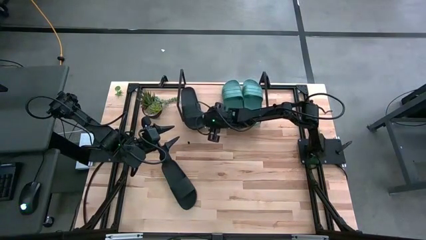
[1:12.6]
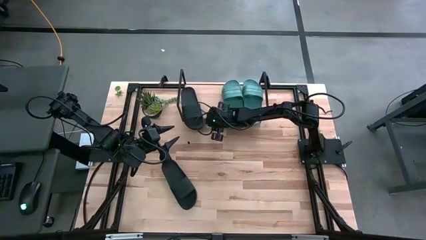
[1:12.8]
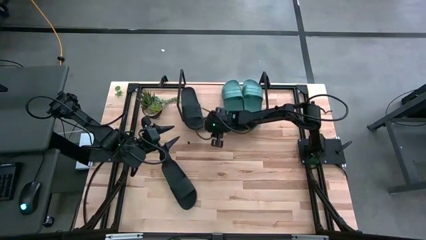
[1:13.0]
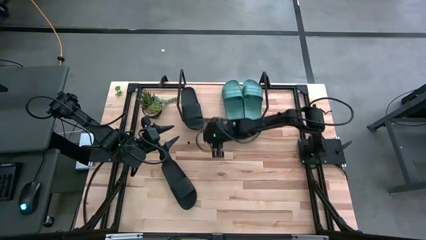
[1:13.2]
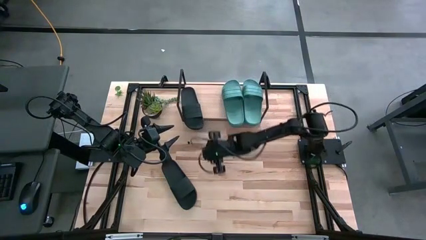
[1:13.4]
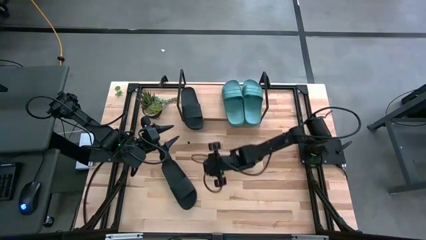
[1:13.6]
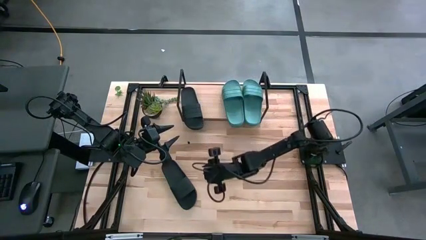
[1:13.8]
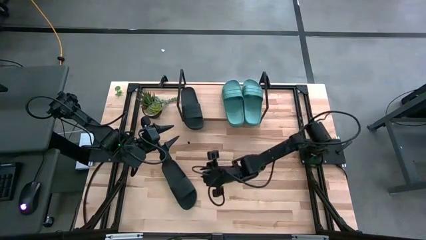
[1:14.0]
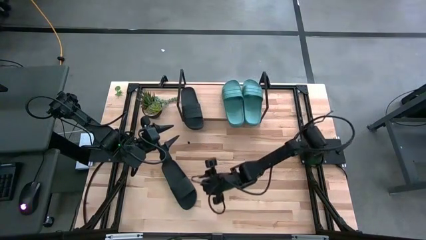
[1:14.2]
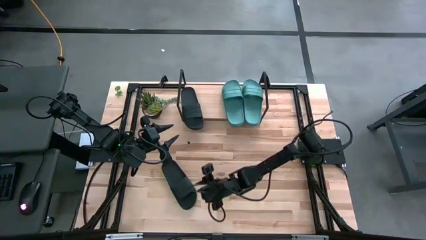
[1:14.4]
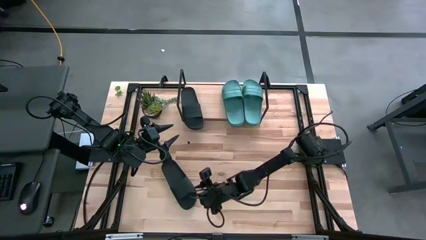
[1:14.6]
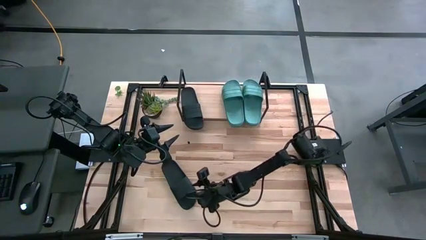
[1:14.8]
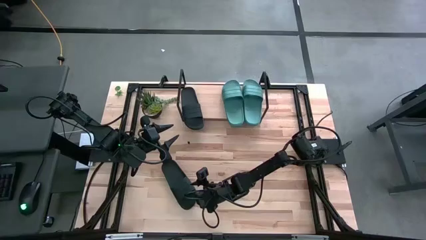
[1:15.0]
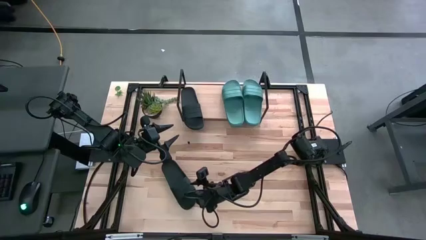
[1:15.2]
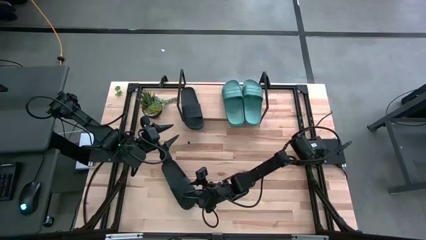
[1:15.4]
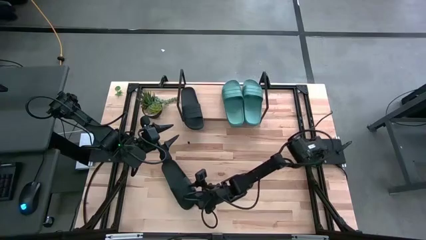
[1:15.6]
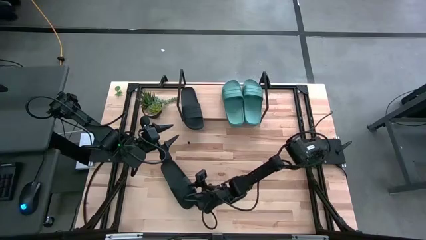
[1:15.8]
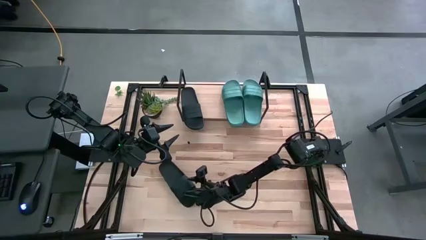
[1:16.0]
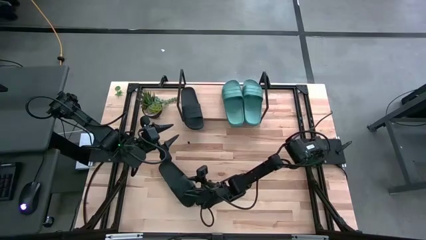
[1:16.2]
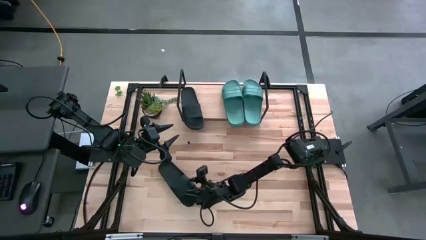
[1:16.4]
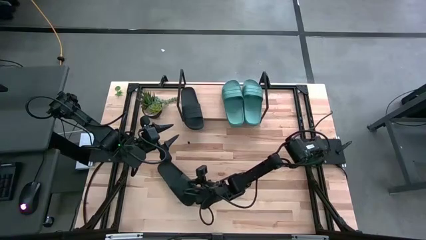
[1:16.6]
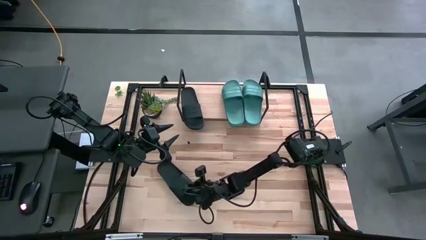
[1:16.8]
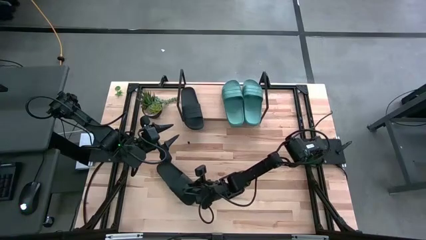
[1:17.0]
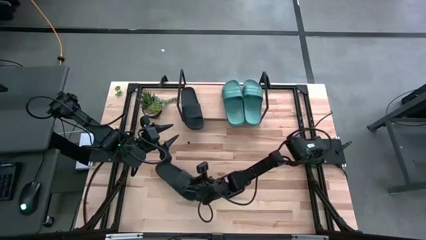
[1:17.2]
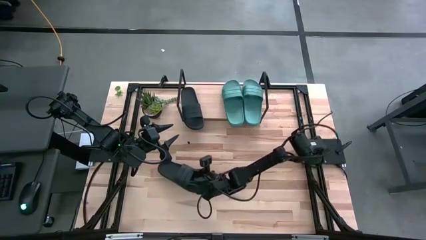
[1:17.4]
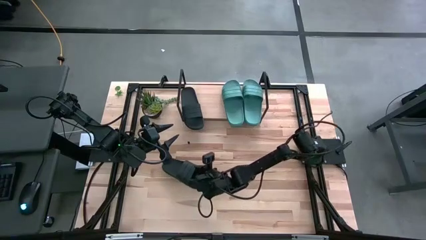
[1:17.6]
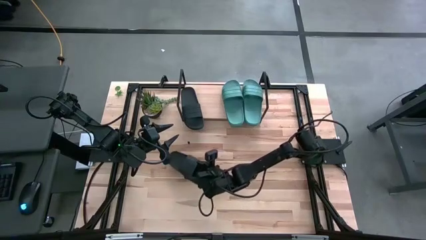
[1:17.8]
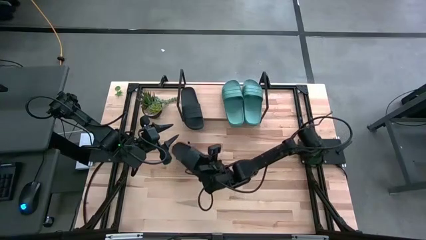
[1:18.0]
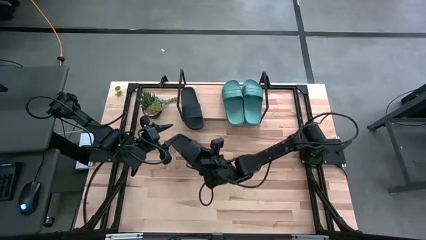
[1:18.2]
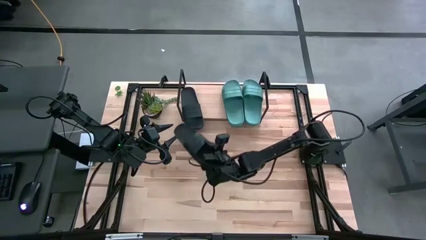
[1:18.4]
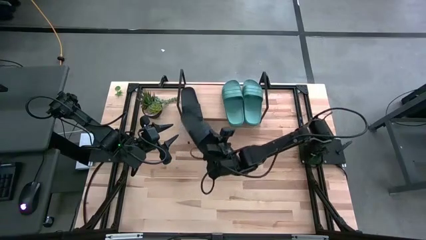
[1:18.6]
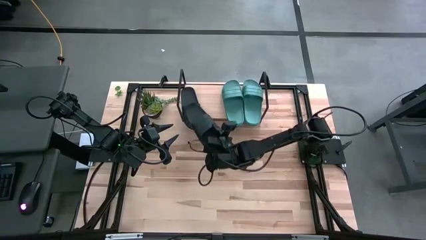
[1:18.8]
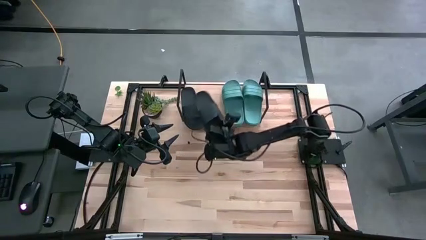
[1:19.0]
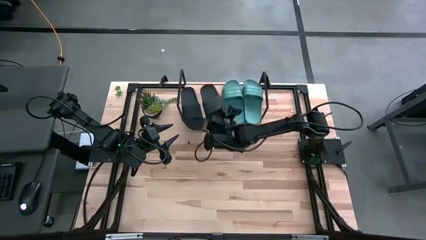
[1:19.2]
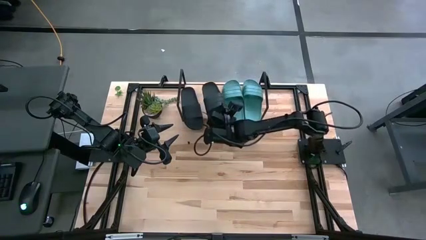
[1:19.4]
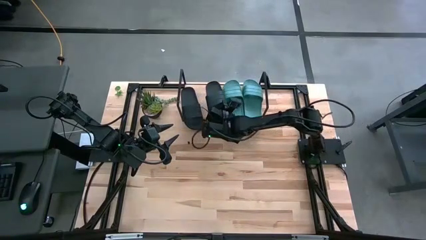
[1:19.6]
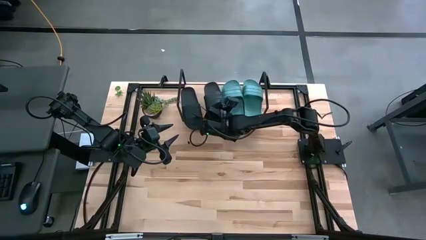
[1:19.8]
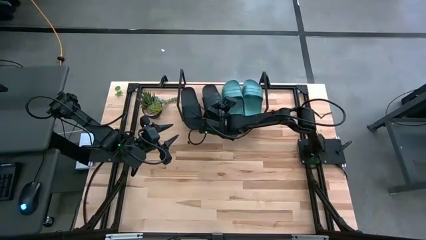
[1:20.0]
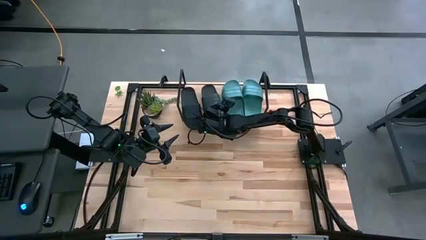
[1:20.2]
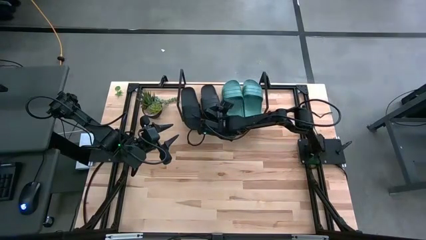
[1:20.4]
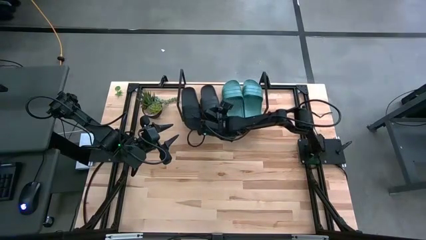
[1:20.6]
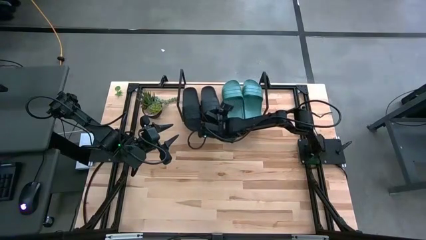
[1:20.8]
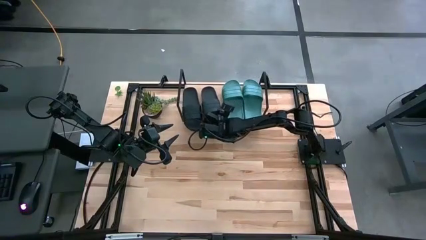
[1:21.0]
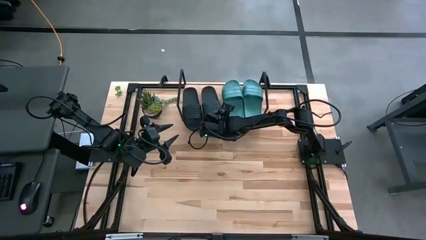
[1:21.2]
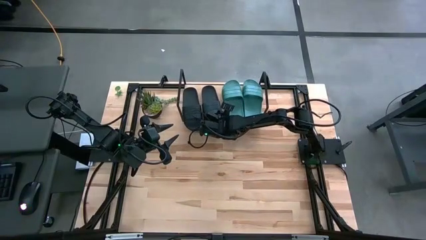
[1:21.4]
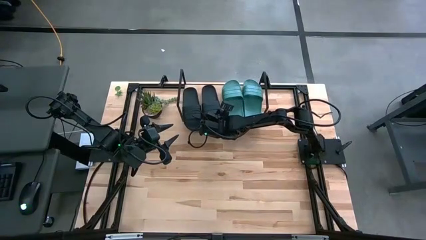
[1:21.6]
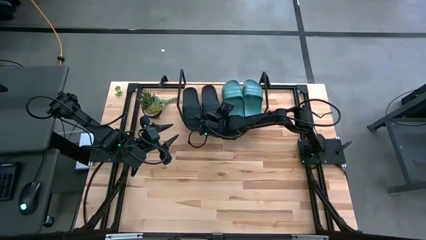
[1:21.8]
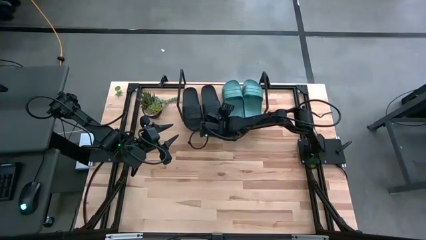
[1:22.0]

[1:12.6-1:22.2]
Task: Pick and place slides into the shelf
Put the black slide on the shelf

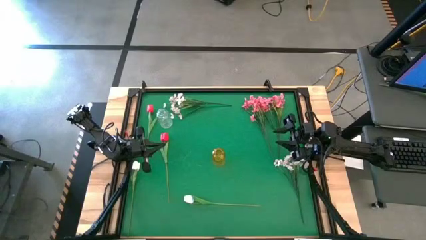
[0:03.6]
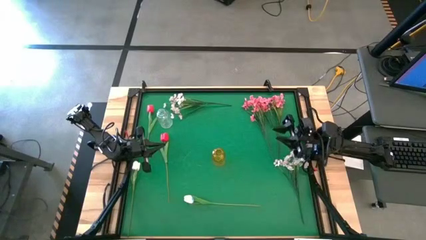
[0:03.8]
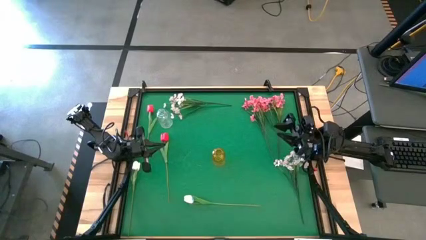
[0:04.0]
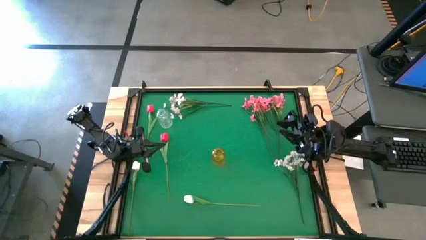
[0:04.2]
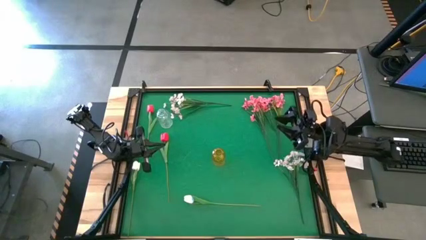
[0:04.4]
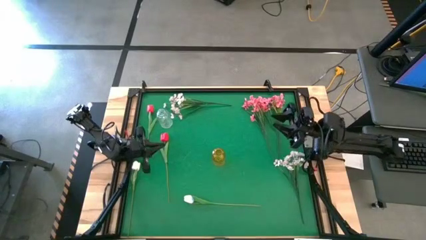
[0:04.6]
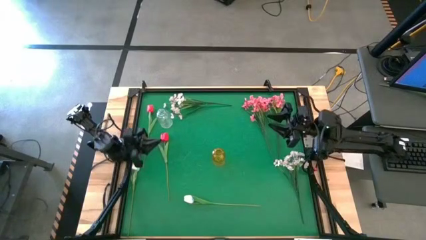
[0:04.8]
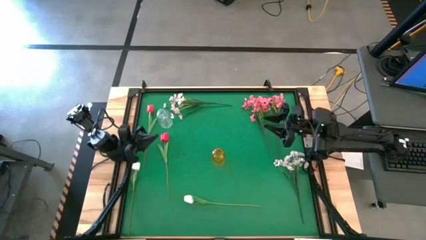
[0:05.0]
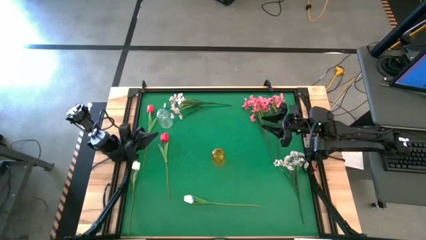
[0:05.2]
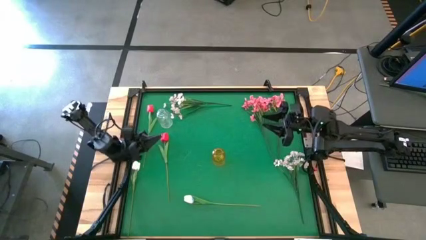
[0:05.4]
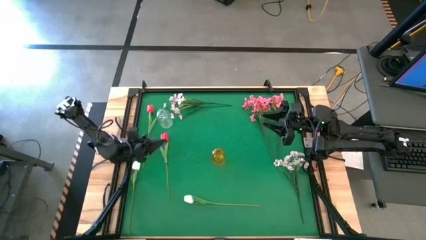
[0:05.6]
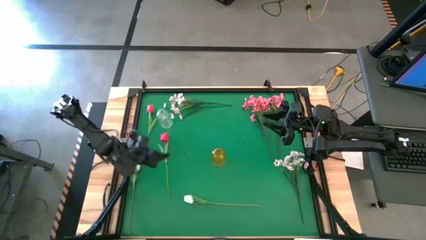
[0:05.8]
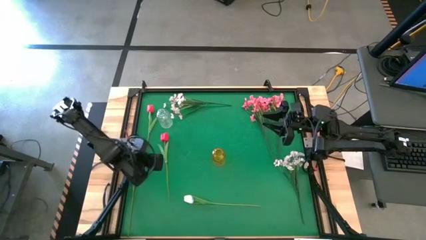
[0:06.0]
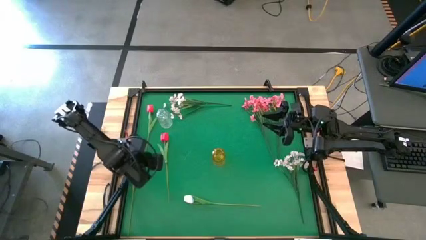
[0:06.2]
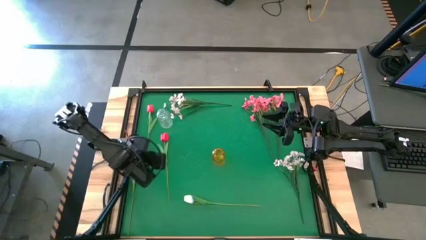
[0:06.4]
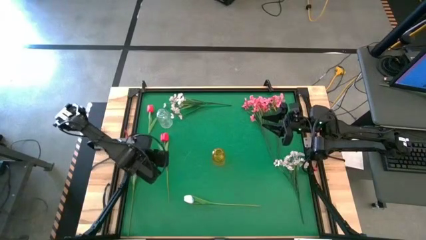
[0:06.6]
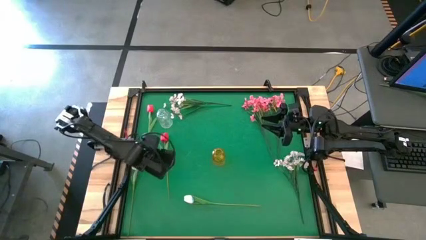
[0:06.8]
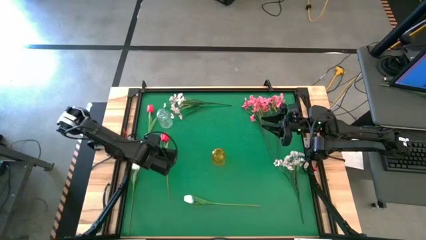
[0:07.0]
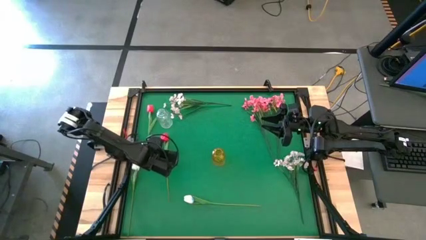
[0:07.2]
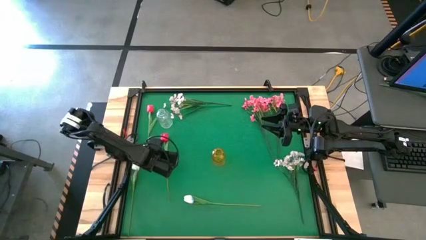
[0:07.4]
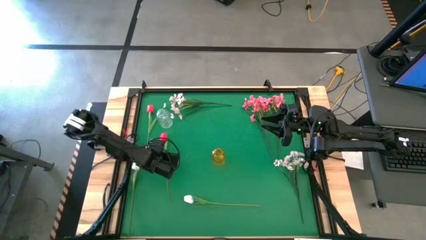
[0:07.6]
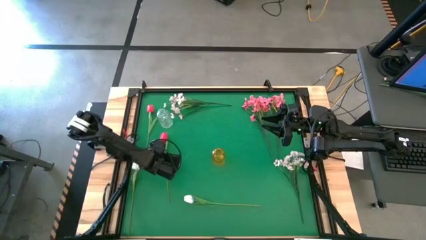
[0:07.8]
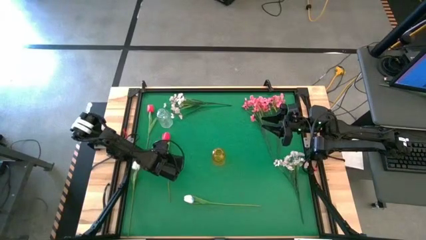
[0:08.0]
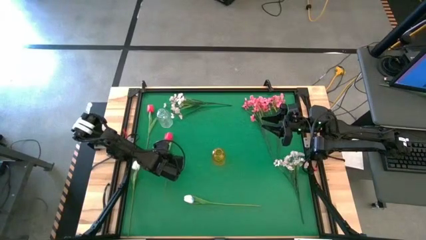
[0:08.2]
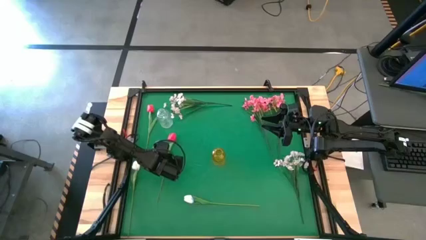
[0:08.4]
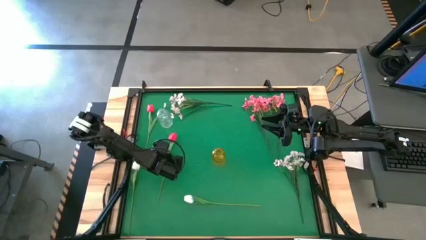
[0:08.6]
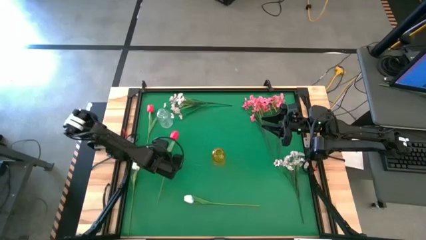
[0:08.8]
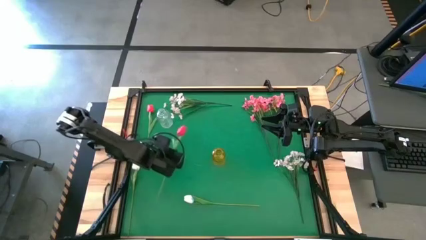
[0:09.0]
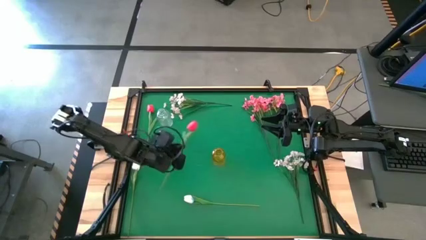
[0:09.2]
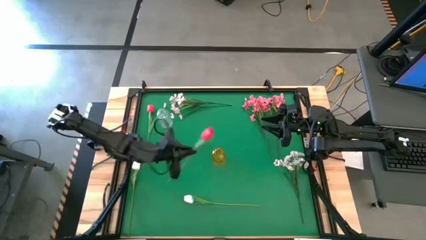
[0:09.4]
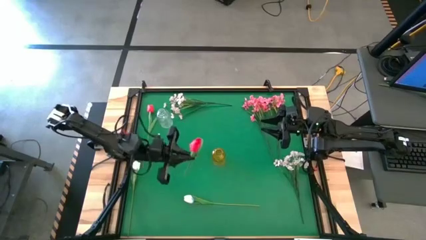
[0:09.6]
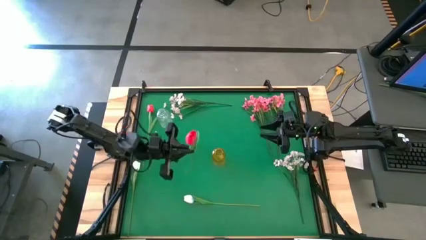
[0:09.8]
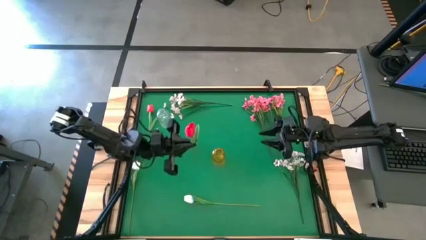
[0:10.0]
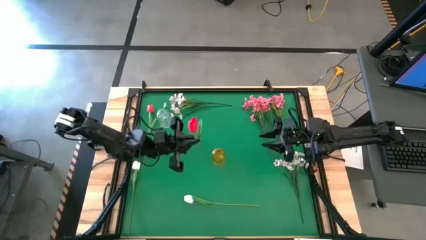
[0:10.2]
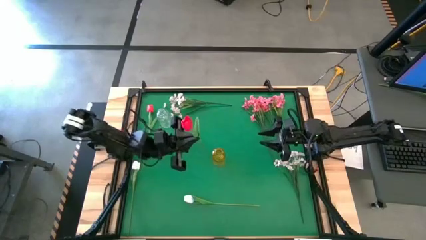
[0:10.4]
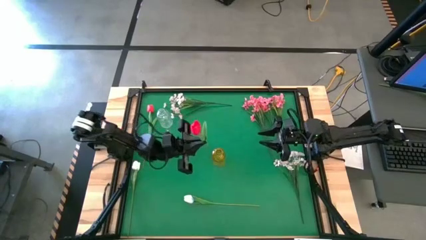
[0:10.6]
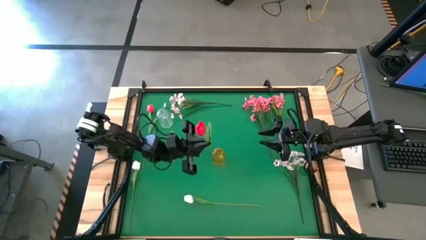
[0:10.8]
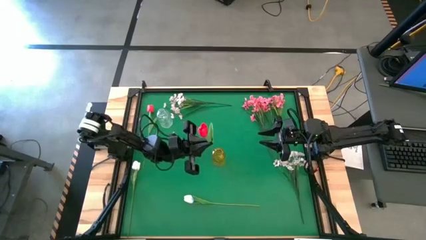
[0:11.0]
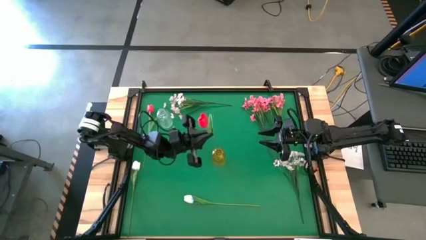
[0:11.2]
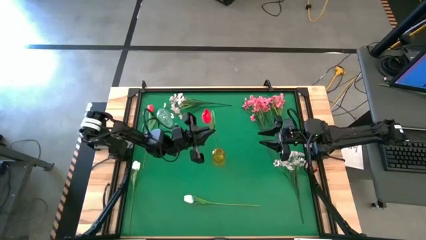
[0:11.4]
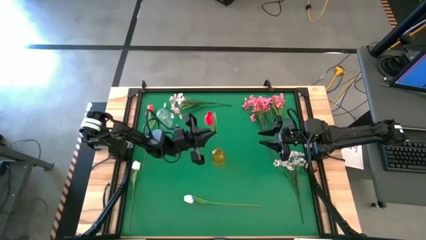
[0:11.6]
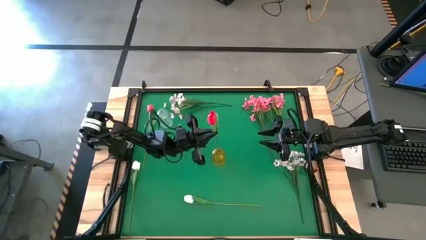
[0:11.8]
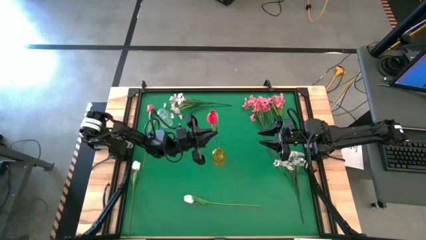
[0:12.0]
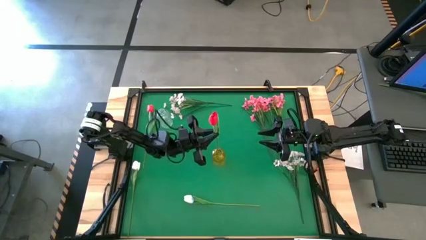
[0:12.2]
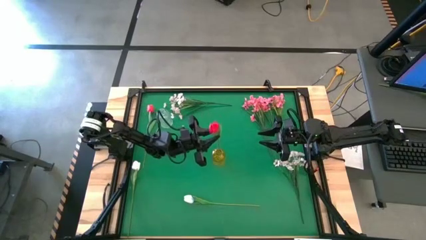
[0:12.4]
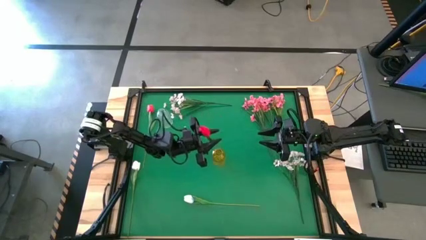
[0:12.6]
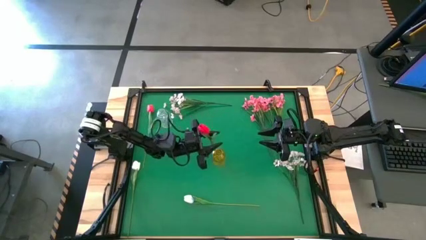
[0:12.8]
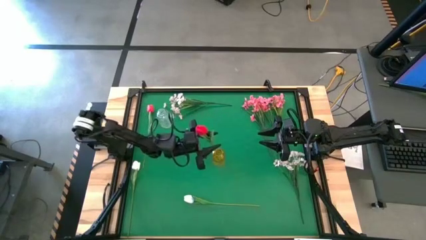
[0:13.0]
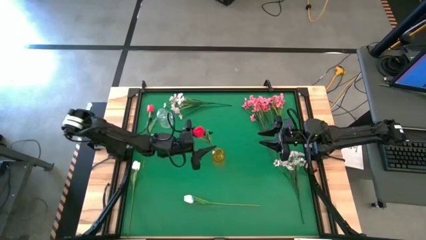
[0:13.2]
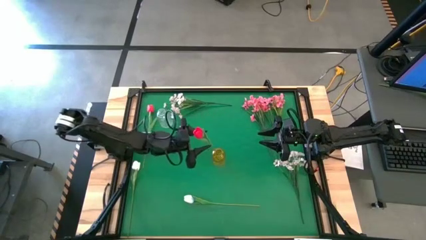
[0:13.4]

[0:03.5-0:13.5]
Task: Sort flowers into vase by color
Put the bottom red tulip into the yellow vase
